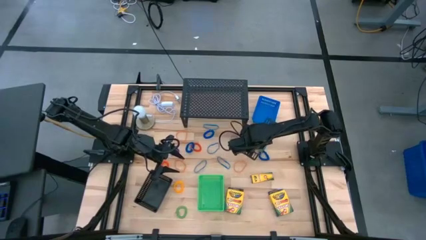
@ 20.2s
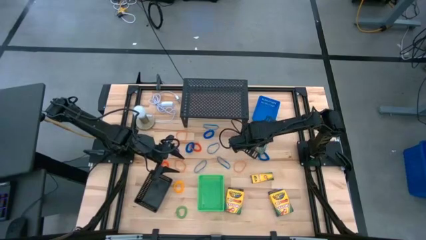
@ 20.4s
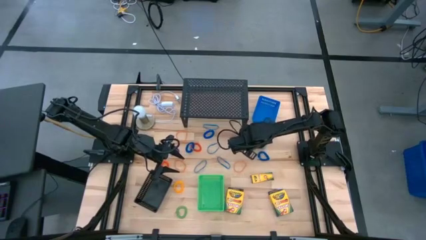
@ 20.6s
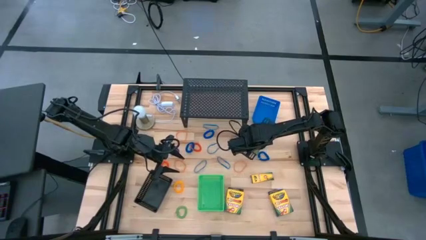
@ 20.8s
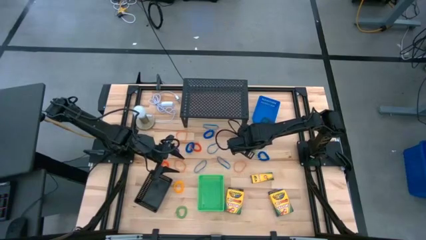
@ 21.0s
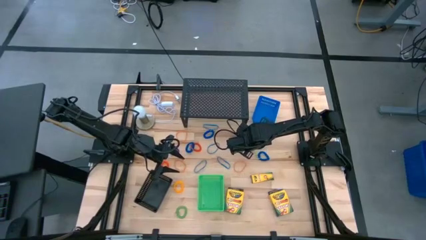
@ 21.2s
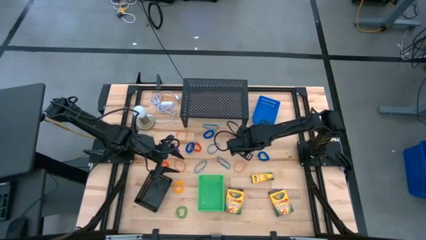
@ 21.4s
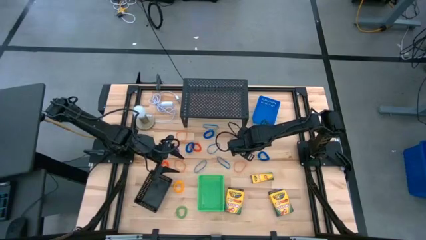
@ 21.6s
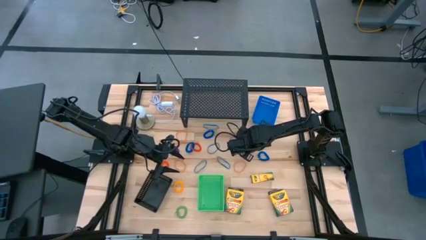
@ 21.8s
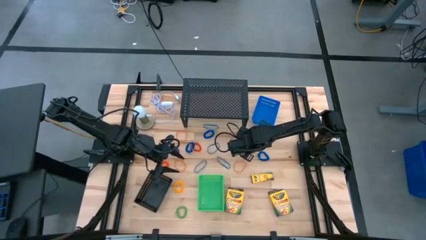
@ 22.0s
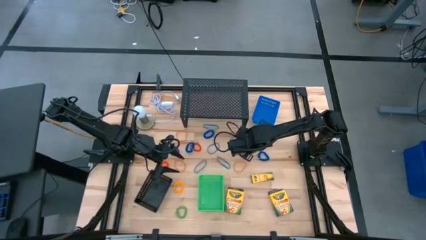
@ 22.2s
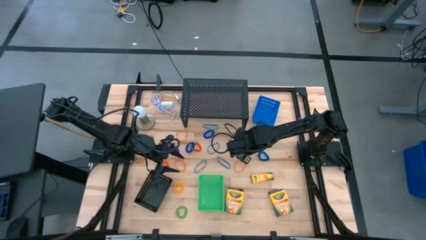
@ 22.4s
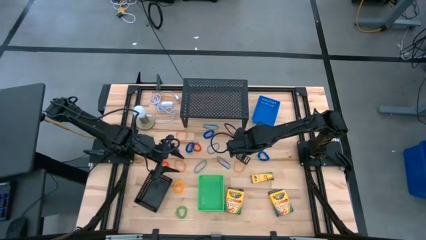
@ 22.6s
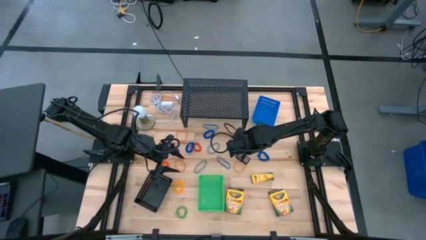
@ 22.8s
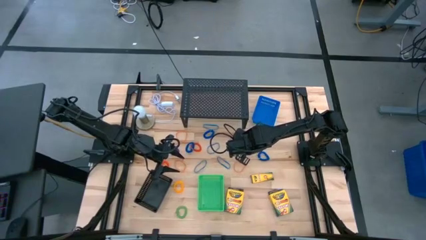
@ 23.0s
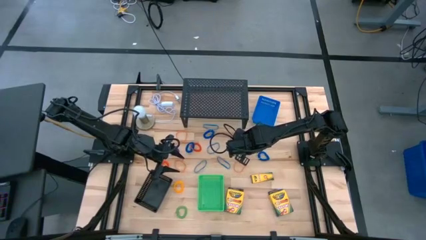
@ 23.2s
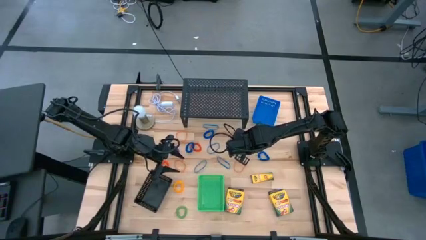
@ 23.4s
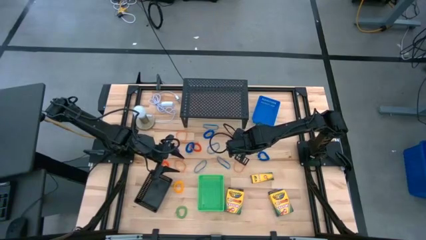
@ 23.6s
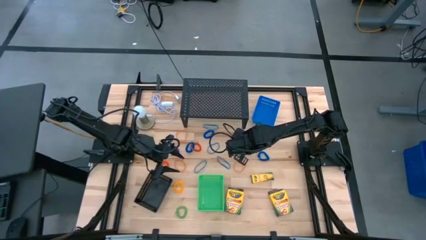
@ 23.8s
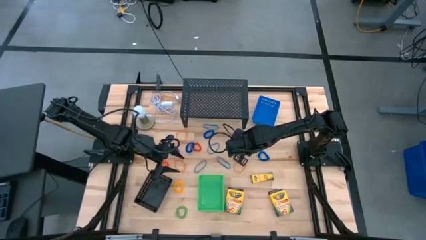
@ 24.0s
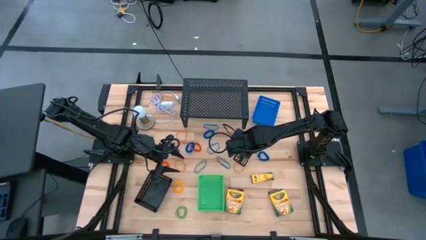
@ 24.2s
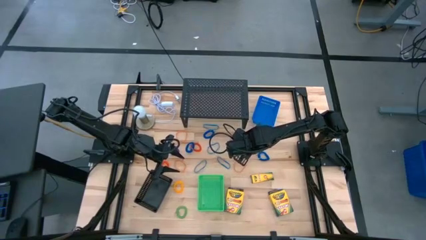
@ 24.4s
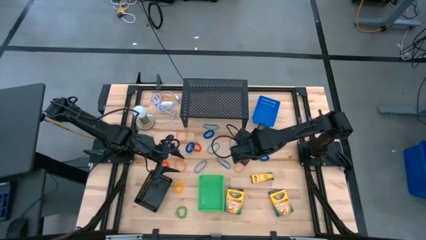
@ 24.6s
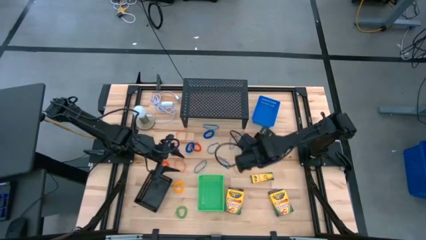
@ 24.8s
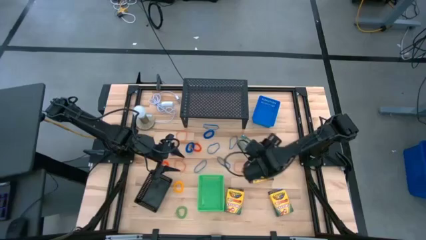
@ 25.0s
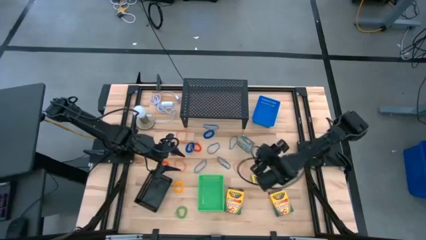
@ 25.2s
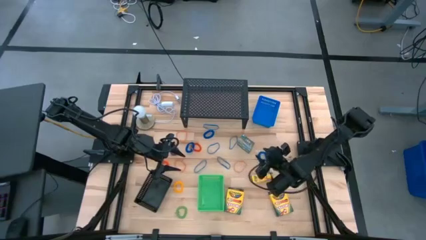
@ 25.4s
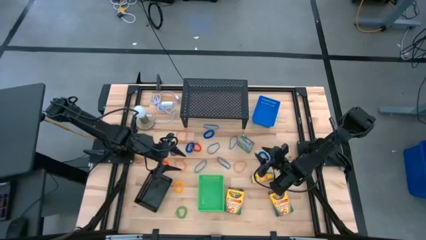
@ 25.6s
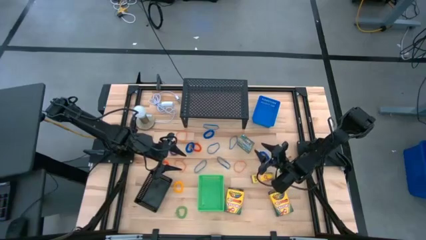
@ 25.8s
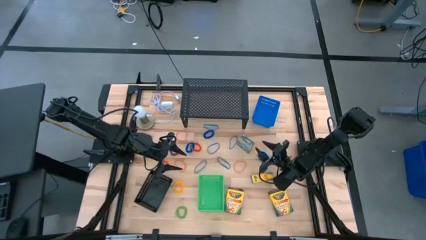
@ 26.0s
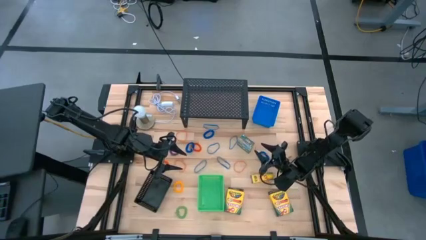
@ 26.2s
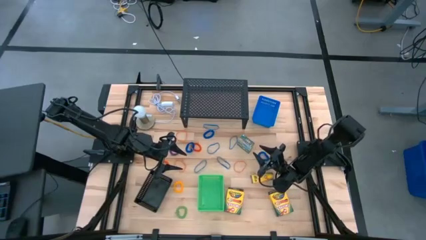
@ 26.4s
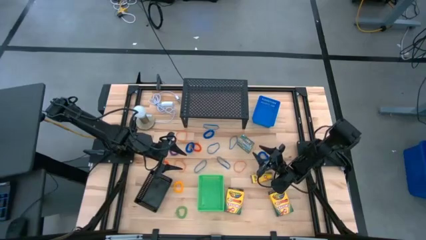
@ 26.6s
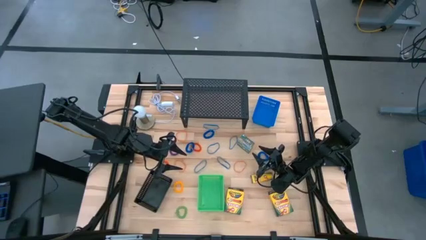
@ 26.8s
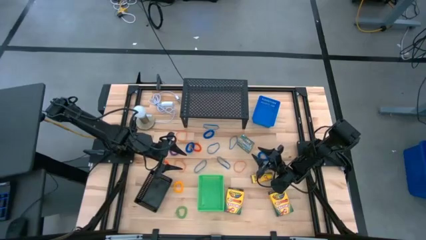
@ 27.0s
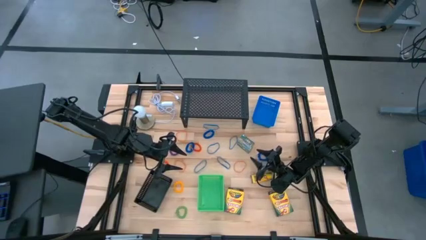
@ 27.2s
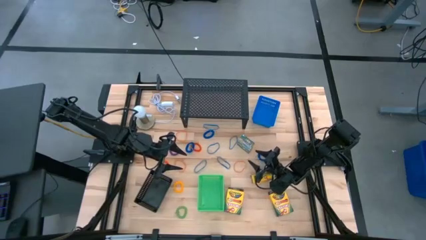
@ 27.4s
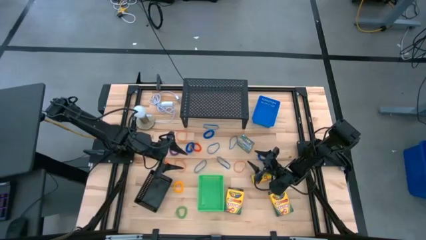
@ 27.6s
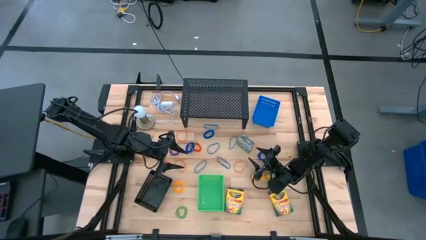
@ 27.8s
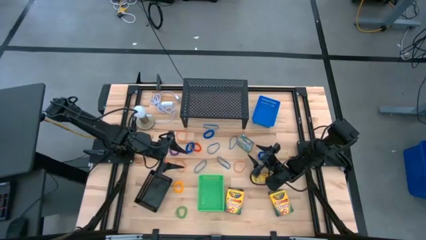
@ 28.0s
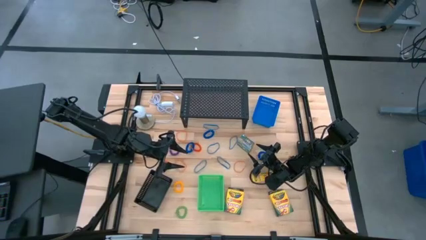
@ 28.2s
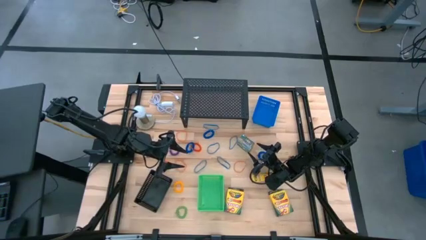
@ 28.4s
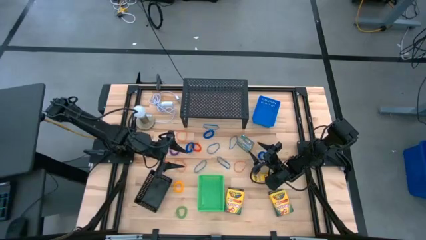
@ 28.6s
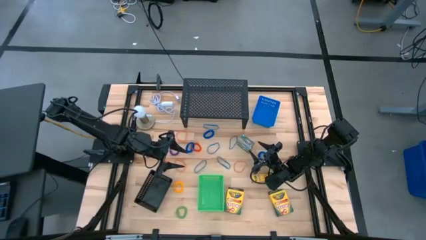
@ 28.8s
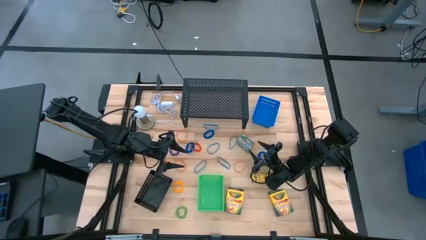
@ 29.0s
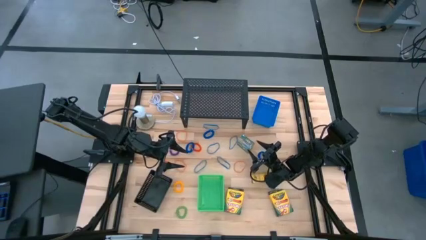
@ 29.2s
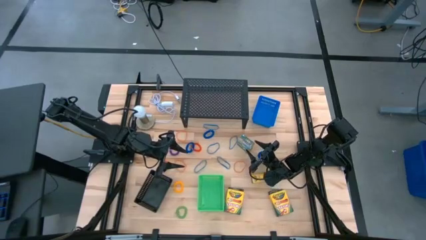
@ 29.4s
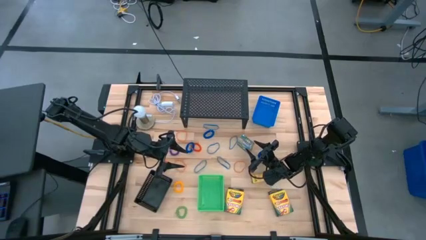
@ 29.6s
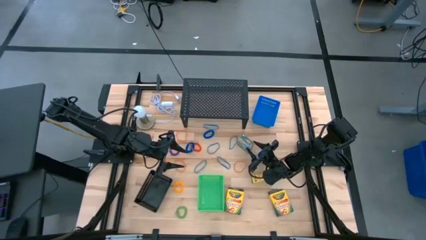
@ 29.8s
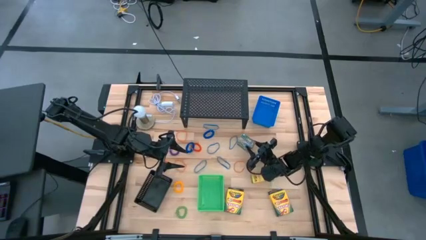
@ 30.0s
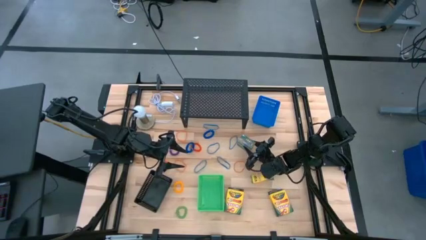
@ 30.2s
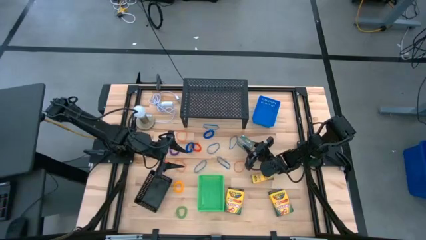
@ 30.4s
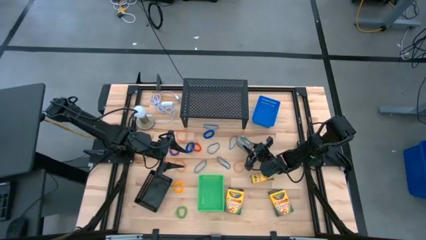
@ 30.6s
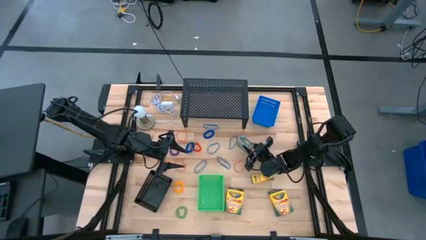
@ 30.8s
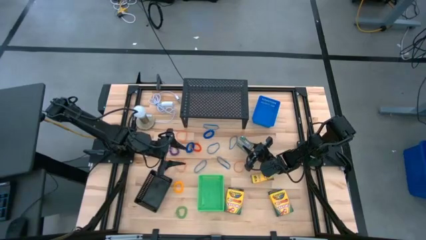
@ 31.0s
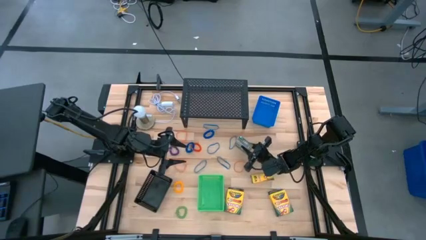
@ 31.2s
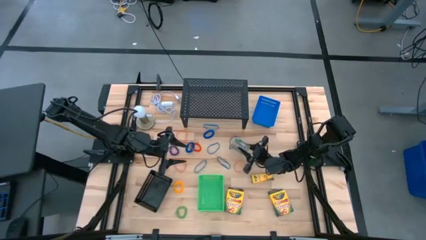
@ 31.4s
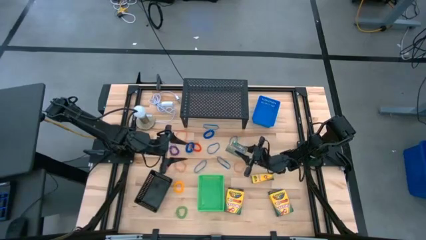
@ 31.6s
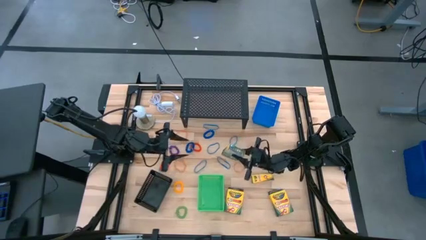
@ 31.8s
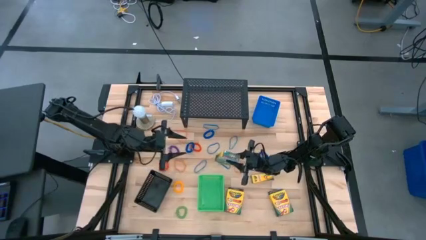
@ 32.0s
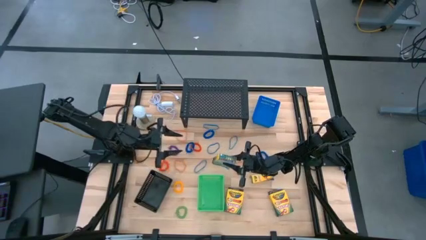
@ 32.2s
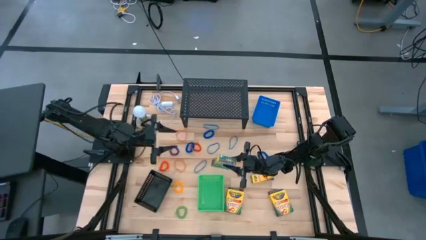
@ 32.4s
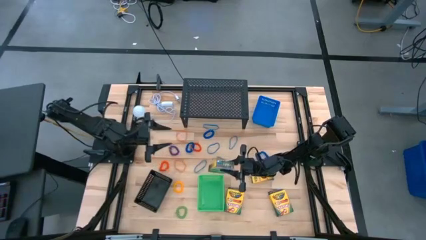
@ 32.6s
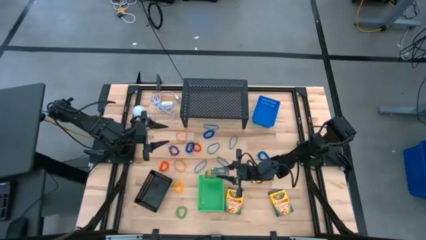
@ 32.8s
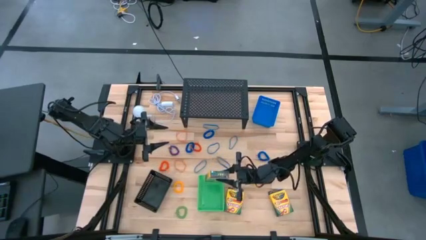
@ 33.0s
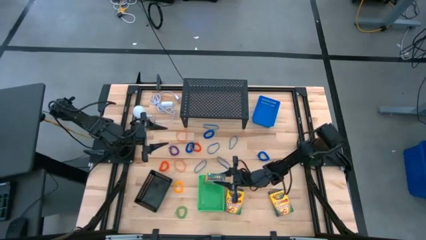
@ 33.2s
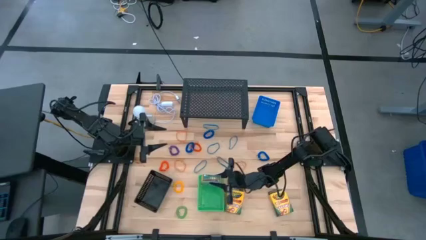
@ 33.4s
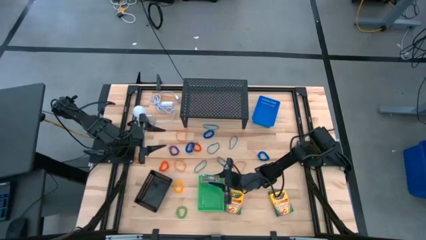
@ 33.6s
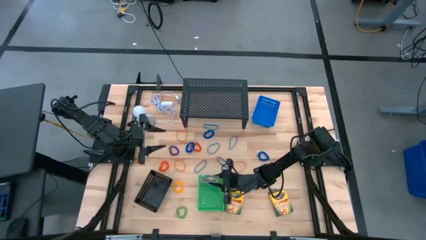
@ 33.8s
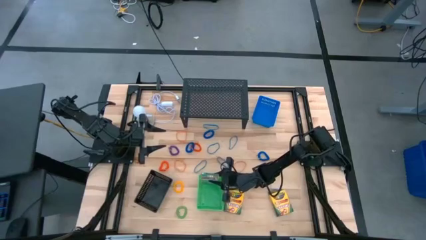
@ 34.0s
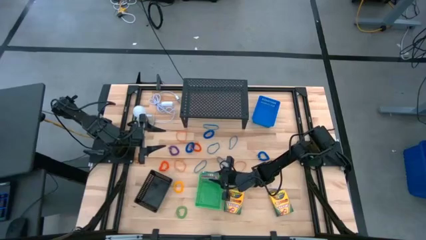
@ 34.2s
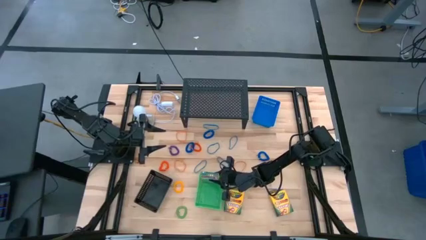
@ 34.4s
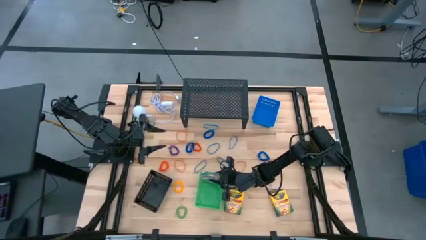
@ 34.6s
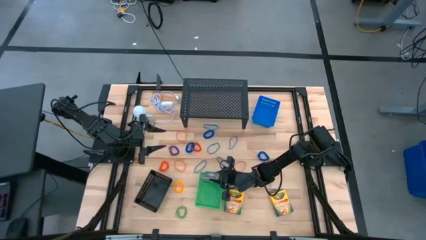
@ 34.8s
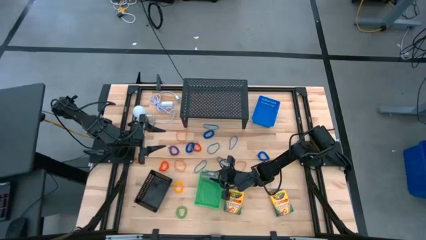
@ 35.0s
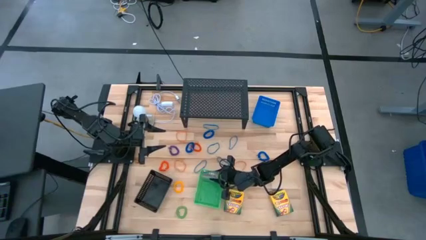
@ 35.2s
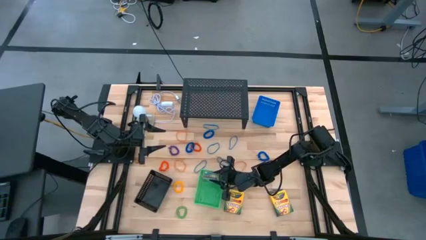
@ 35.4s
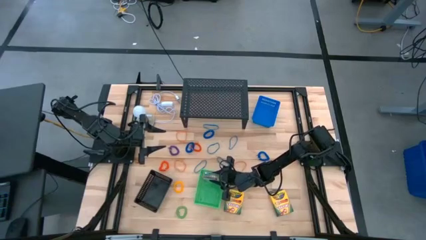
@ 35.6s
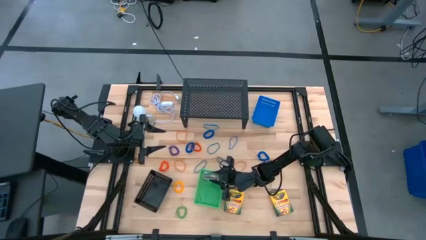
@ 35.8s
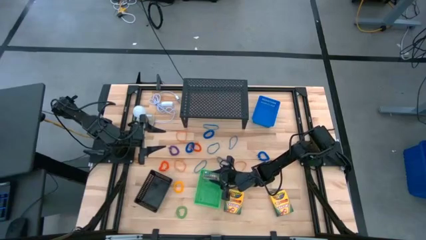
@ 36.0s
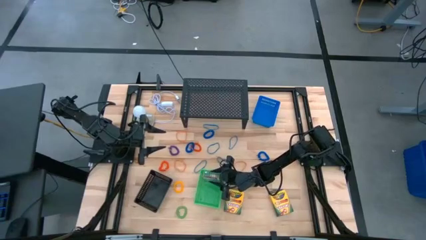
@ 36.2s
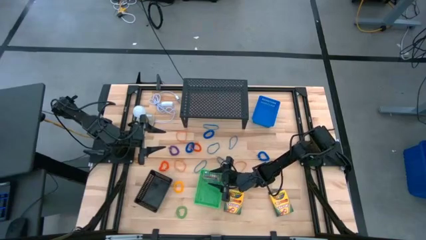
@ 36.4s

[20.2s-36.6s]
Task: Pick & Place Office Desk Supplies
Put the crayon box into the green bin
